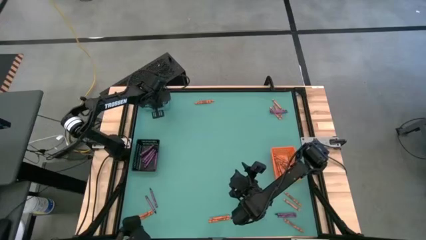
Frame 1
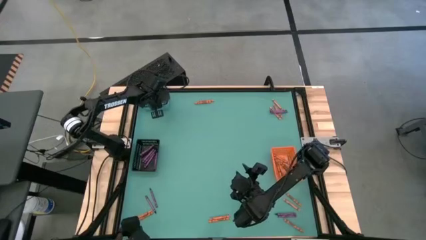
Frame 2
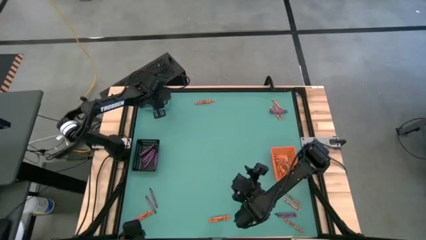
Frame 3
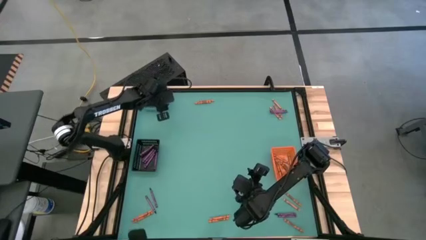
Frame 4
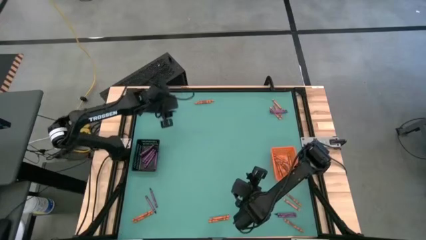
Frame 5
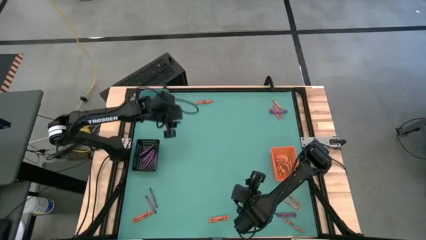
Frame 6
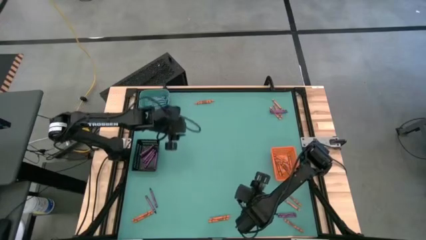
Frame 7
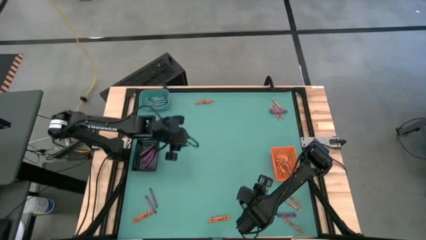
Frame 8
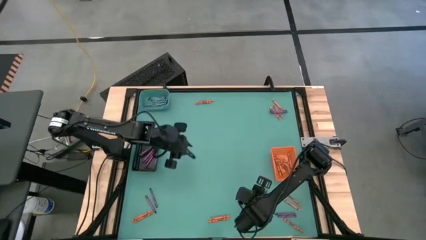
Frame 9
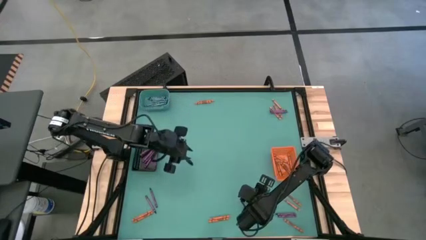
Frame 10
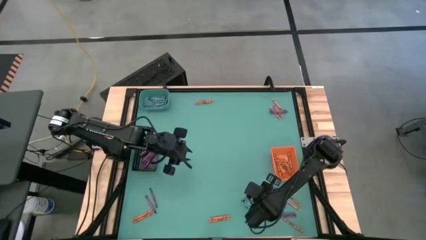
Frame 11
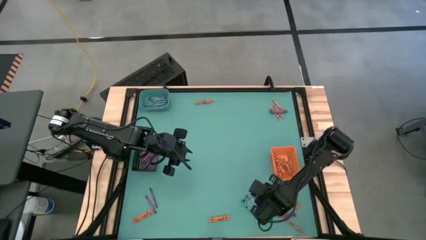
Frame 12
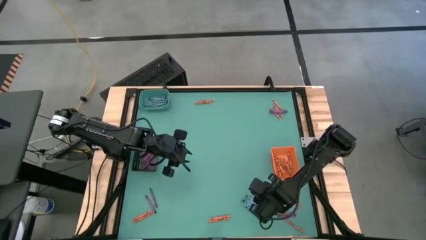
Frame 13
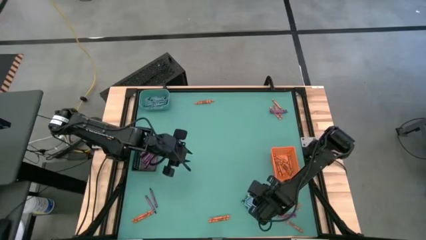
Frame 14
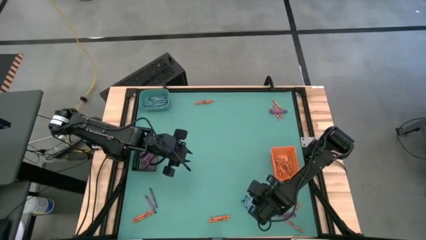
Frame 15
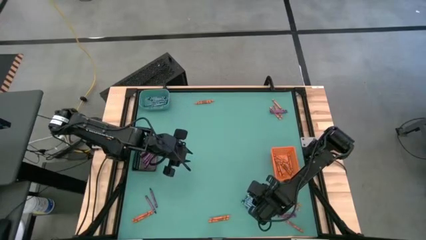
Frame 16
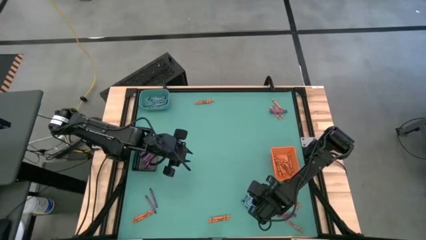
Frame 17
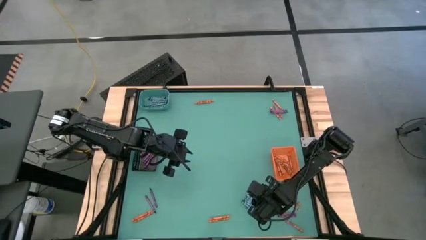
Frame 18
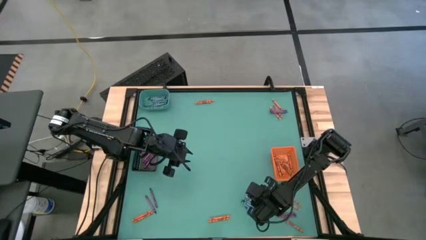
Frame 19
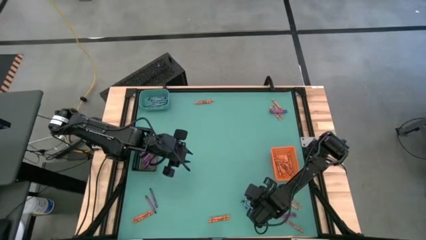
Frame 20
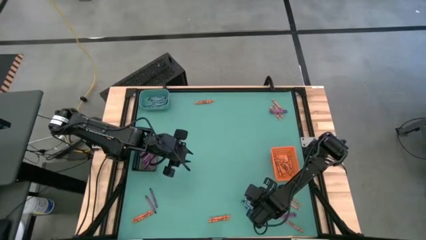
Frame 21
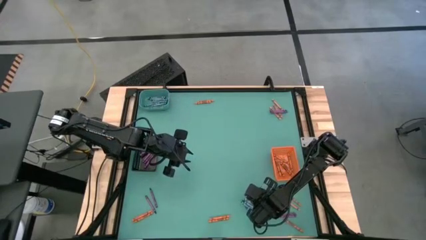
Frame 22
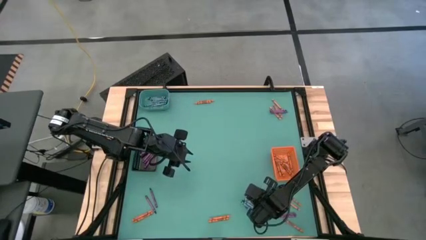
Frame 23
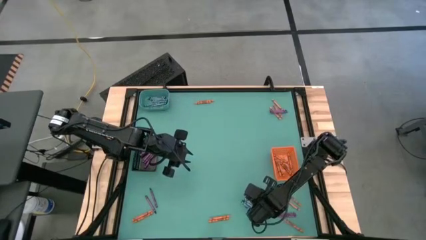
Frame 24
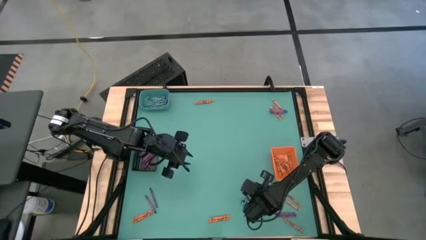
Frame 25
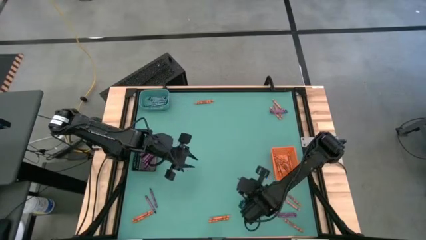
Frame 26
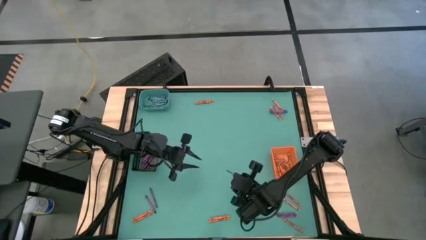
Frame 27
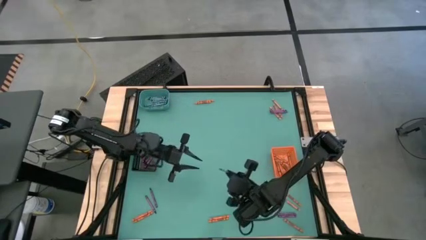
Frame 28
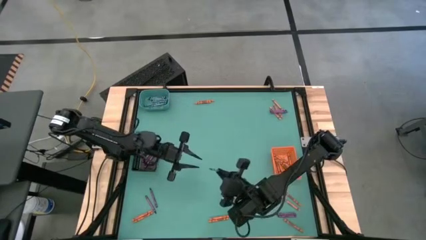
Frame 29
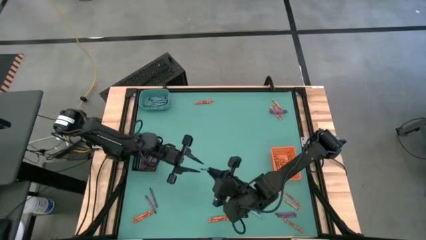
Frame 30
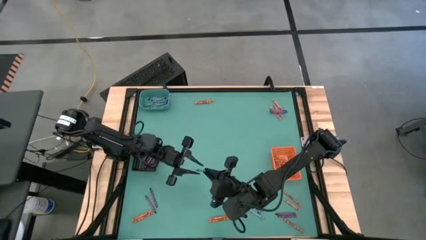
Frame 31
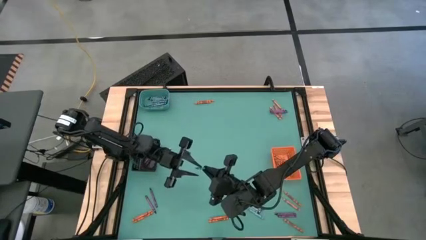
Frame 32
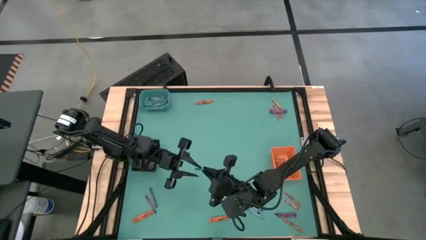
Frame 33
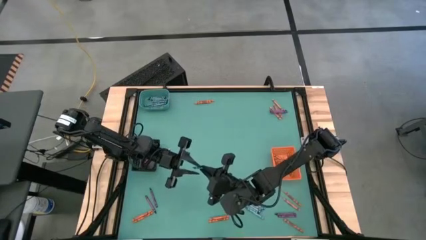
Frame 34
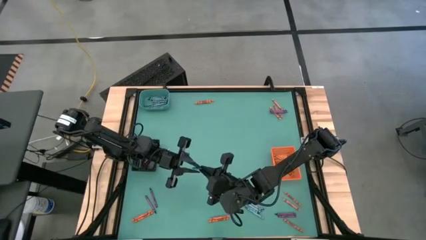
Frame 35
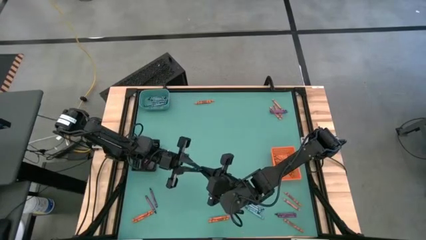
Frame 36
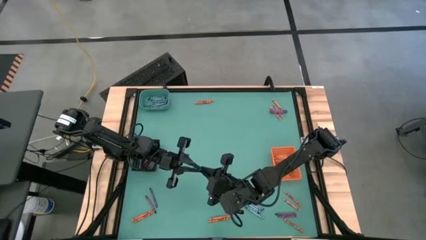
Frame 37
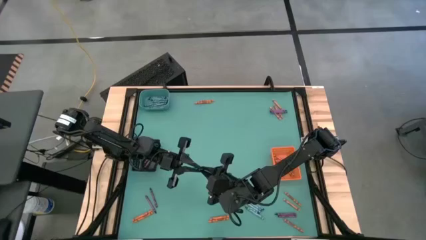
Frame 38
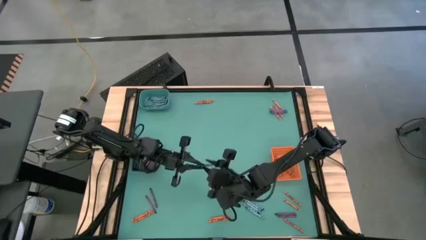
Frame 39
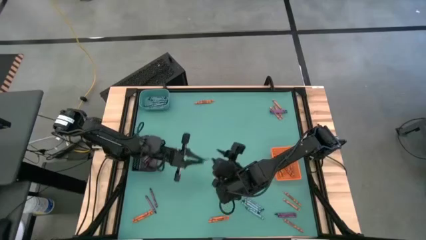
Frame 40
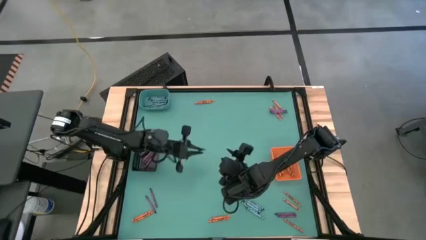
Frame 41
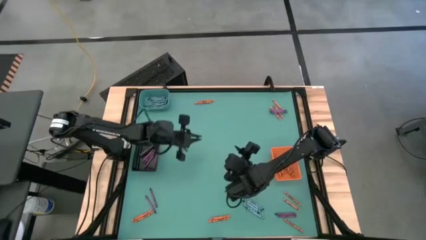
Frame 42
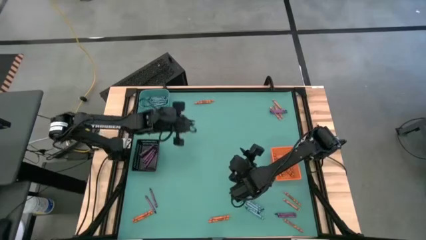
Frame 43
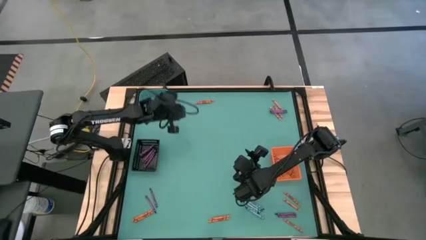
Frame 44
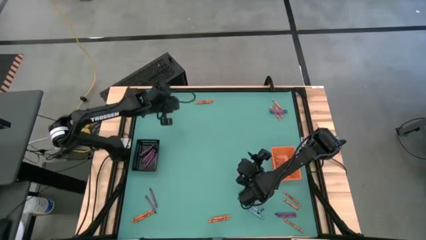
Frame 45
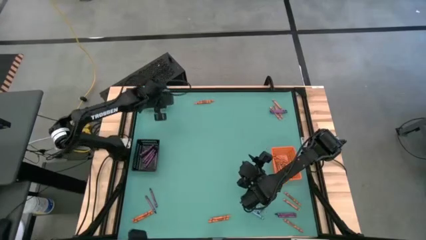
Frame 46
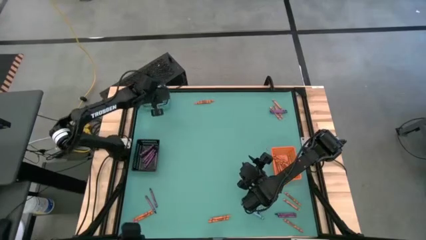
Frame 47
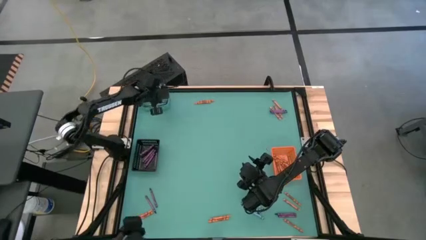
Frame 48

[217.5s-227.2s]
Task: Sort crayons
Put the green crayon into the green bin

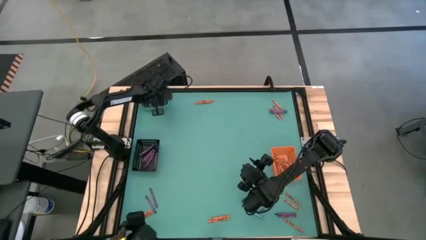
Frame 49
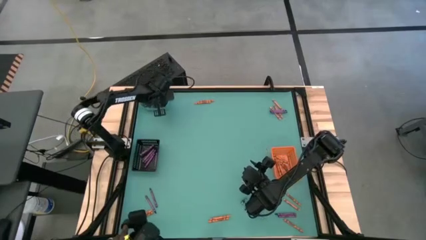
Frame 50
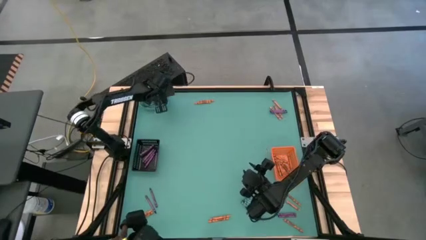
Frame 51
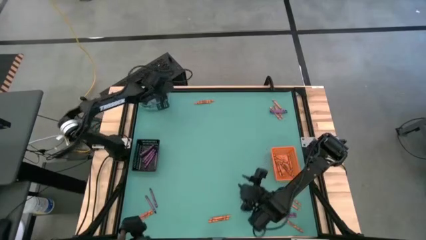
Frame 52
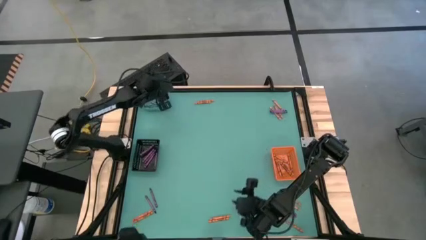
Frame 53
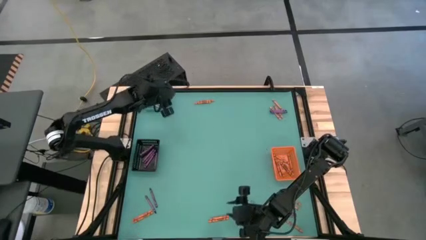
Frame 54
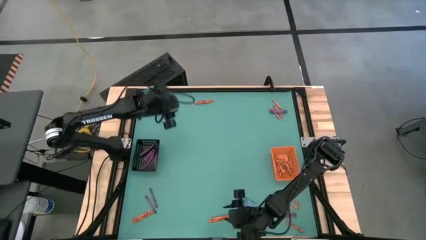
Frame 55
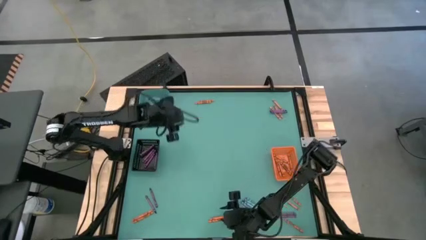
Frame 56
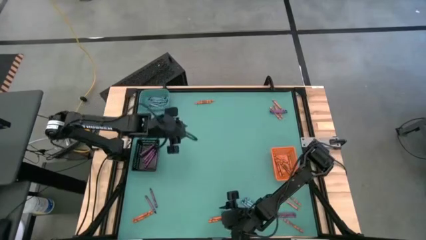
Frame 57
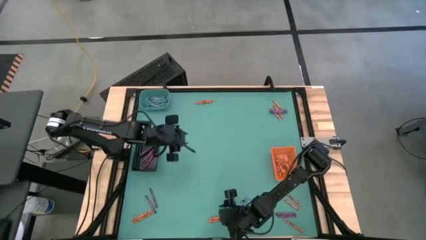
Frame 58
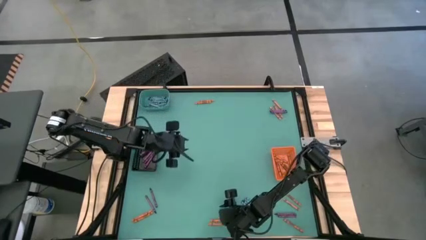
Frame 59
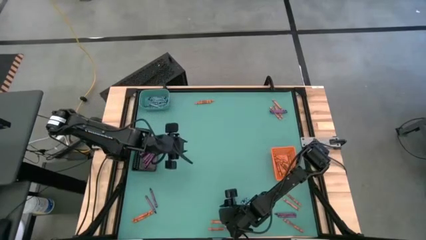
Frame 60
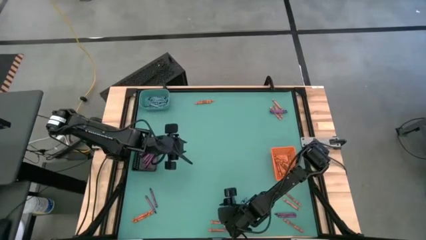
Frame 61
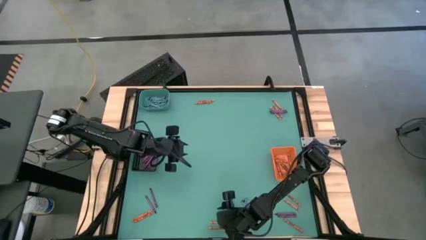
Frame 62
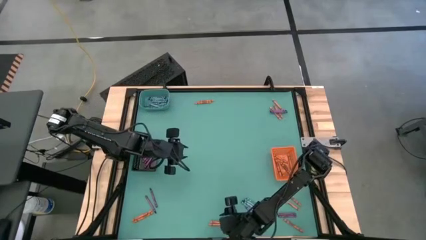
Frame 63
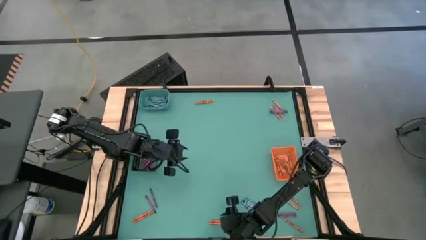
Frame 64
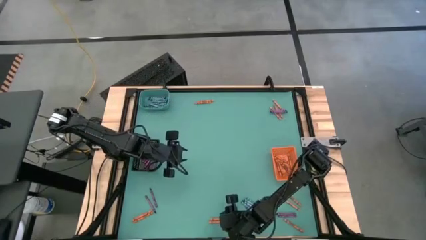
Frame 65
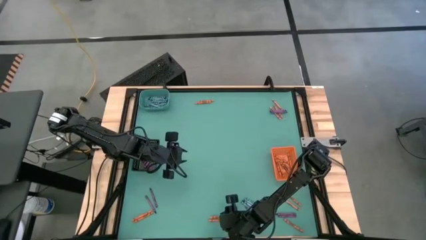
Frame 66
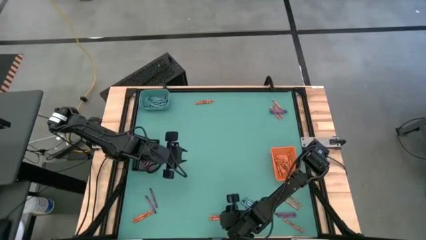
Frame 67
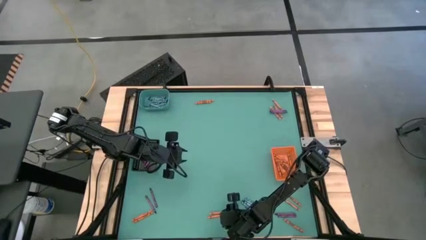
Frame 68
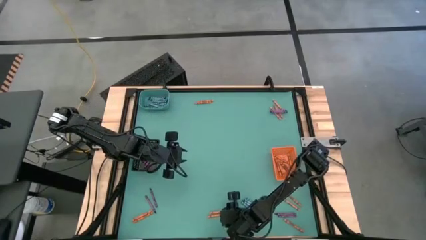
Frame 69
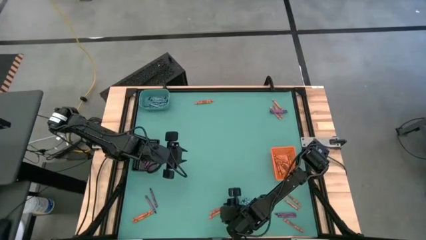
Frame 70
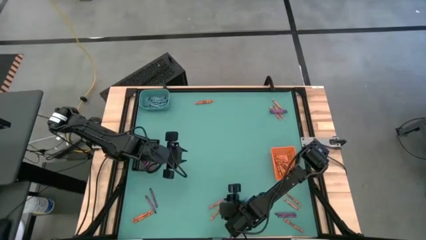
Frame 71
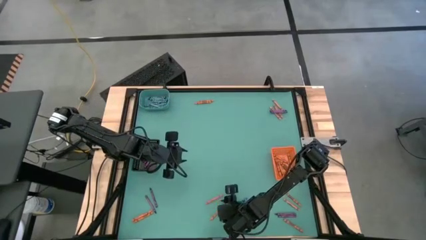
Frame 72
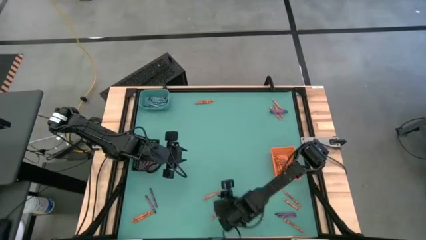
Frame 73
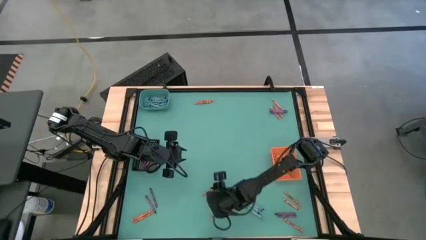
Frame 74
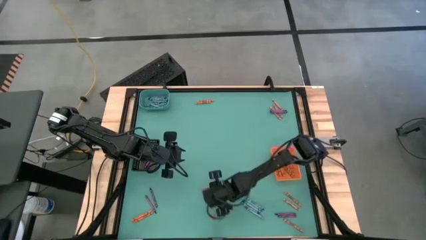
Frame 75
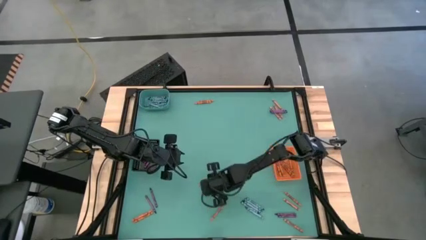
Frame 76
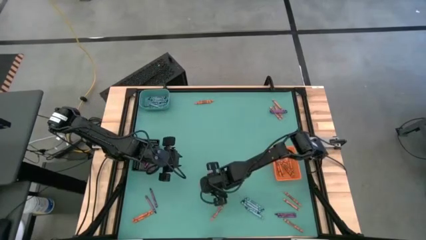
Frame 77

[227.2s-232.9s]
Put the orange crayon into the orange bin

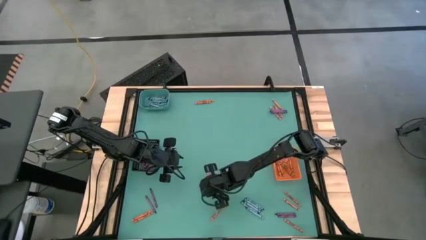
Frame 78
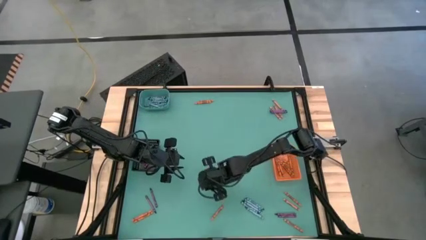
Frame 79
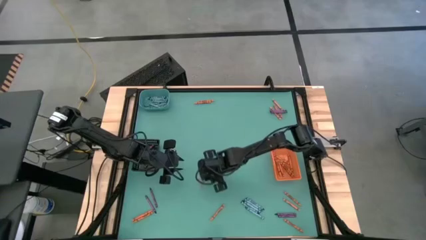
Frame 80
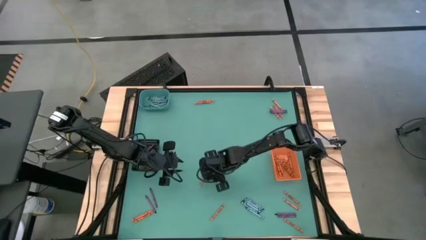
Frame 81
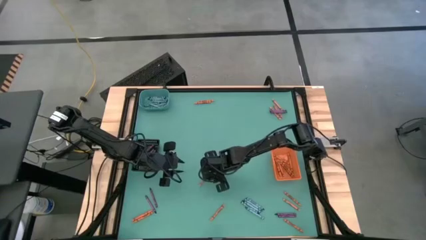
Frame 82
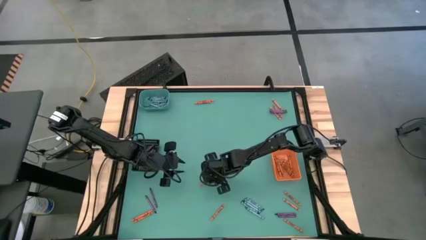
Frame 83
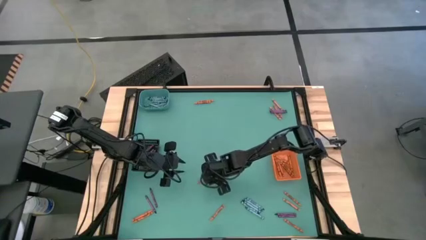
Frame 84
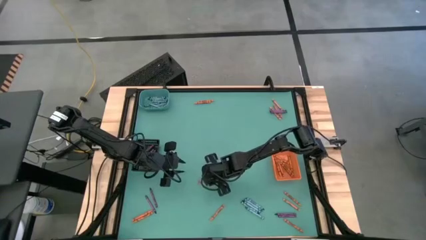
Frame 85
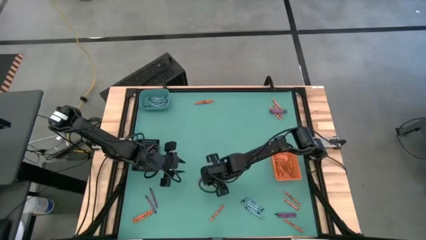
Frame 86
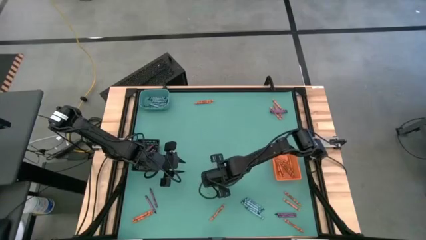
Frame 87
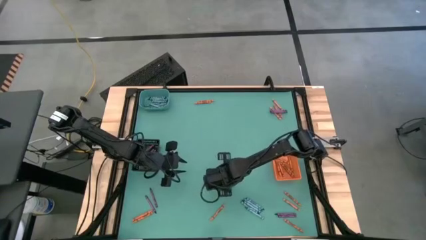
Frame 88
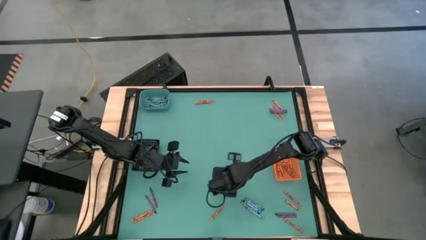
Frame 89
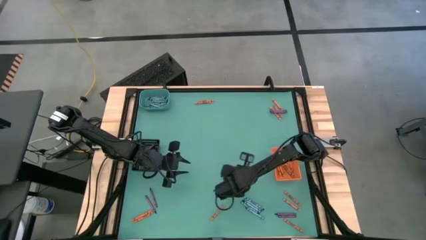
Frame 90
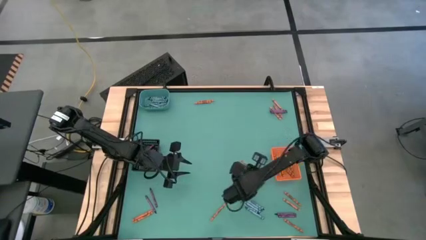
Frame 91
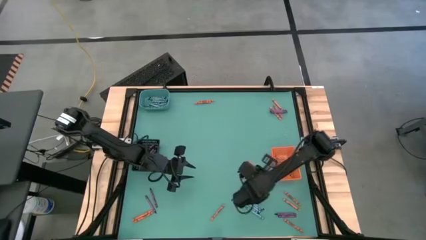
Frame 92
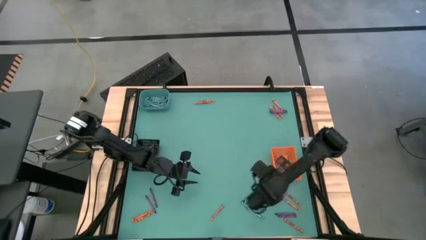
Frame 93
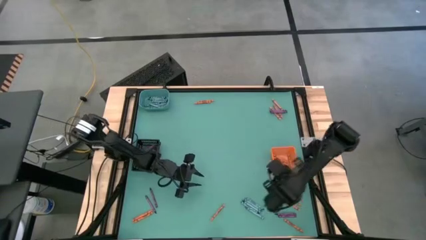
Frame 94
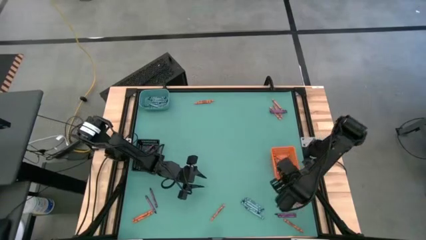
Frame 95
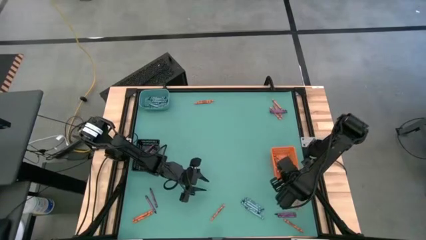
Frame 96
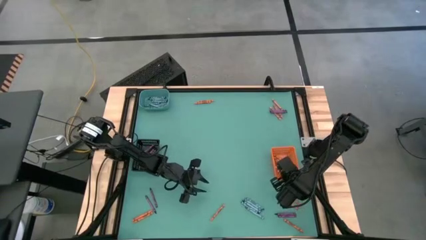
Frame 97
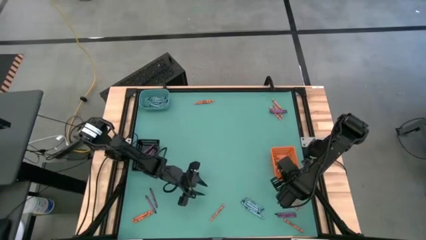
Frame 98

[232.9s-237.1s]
Put the orange crayon into the orange bin
